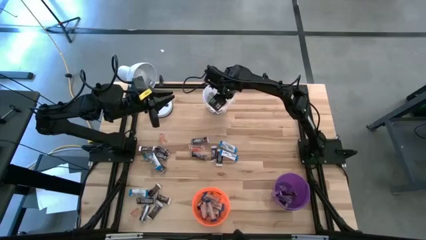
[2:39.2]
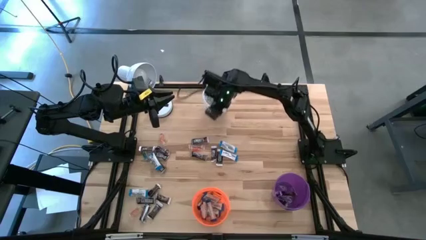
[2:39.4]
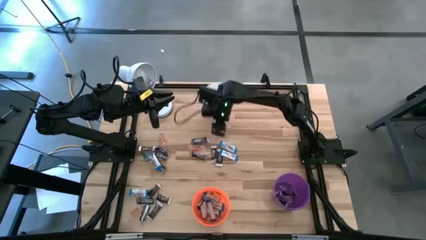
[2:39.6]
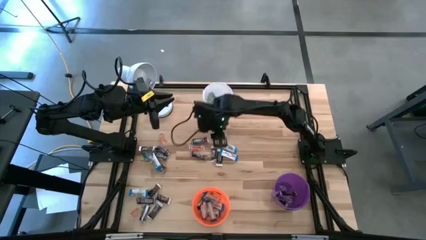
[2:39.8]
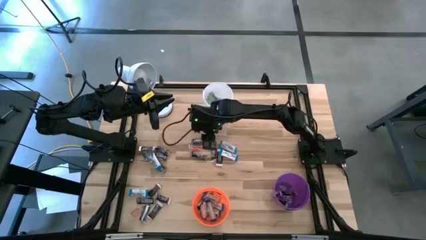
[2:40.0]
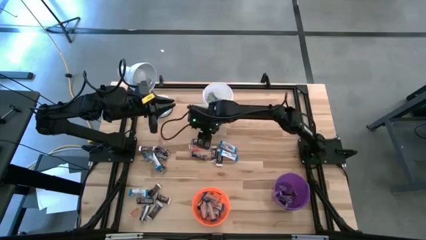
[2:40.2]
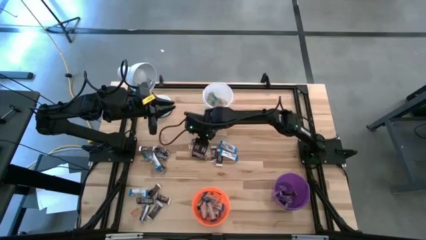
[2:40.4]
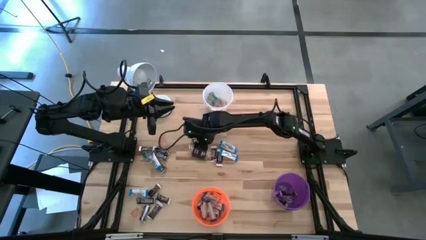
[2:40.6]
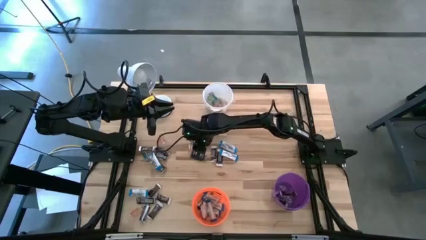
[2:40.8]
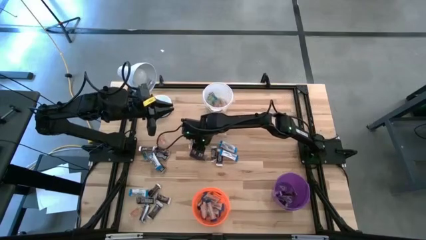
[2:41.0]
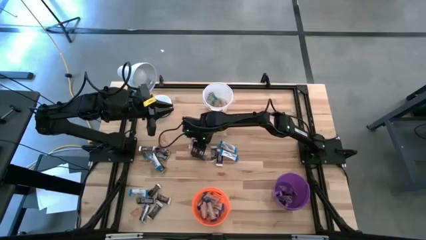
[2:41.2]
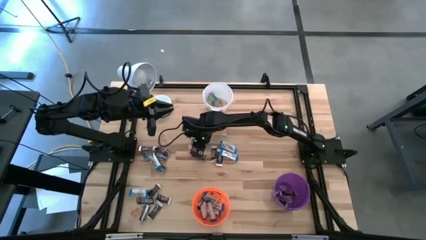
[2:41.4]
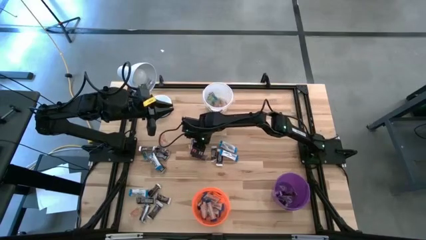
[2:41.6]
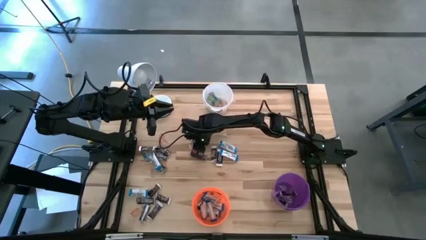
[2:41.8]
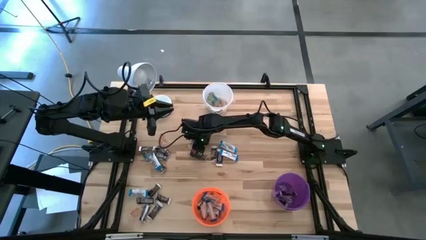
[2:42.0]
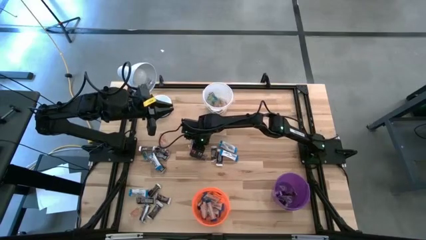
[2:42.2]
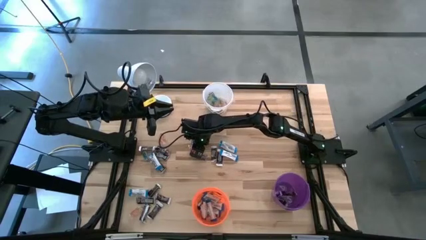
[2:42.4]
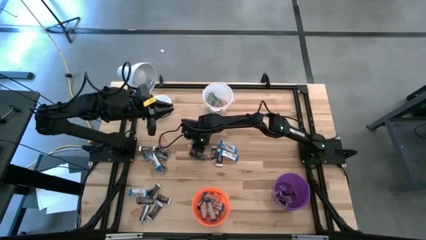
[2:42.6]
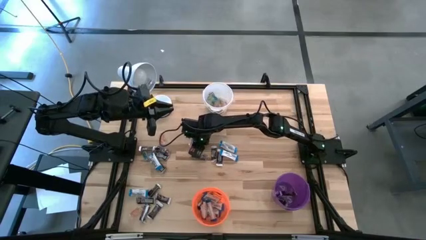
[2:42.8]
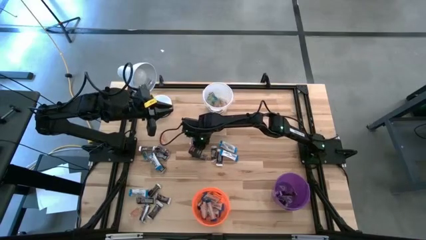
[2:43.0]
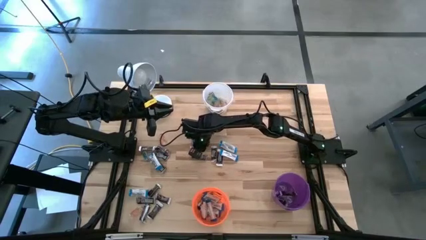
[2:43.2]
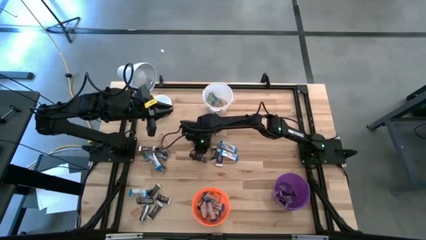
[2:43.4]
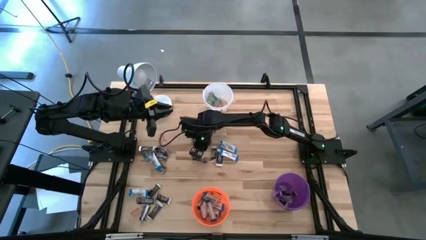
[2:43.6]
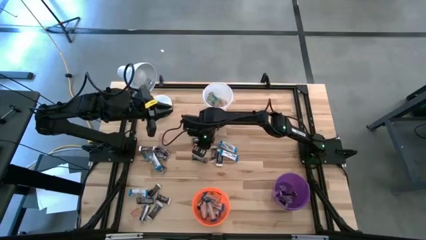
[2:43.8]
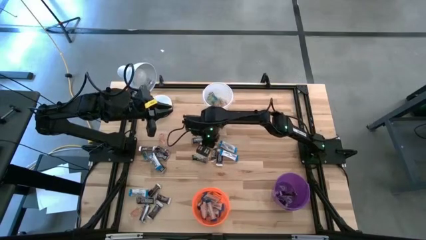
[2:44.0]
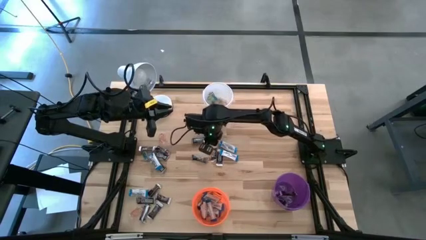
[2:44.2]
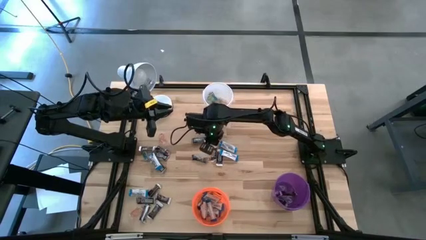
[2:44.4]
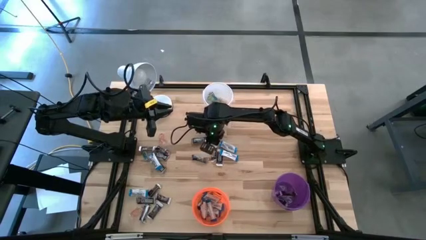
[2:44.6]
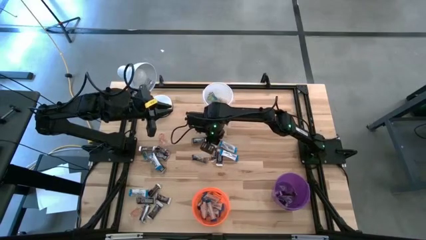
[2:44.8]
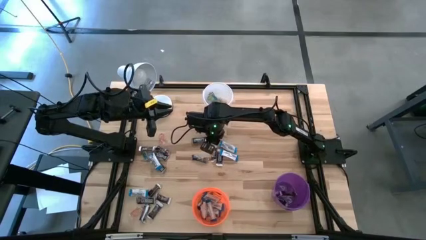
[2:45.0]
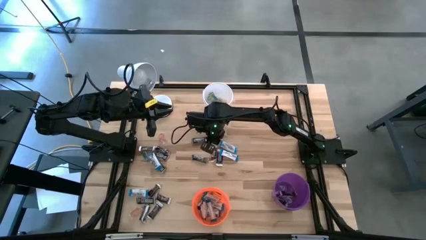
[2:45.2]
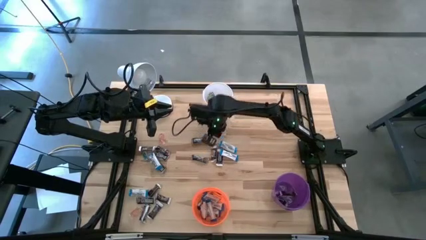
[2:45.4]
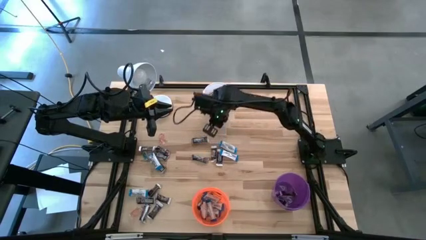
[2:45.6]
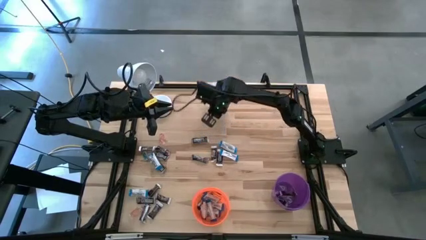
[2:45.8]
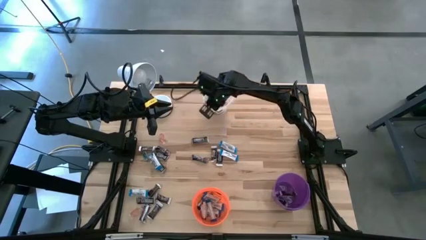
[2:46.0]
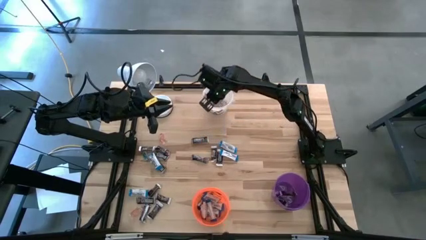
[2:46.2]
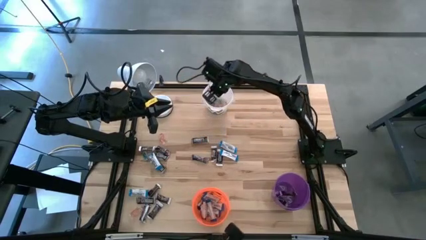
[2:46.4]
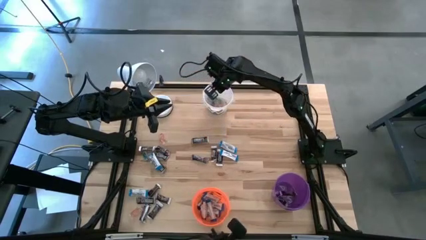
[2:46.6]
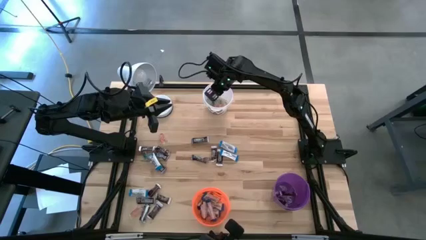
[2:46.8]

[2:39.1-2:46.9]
Task: Organize candy in baskets
Put the red gummy into the white bucket

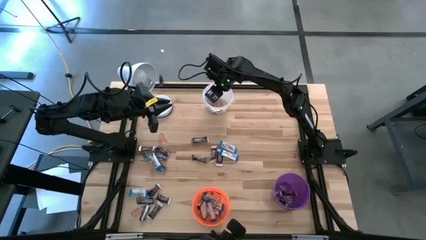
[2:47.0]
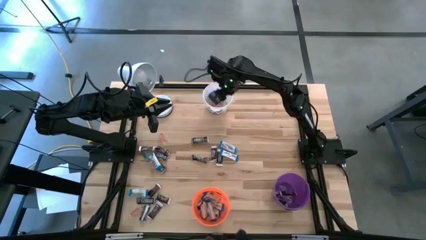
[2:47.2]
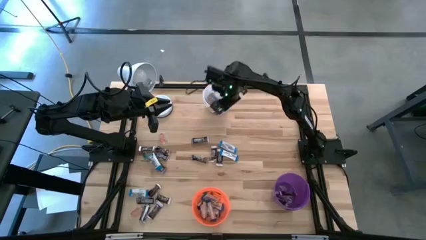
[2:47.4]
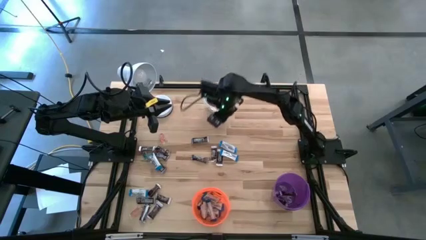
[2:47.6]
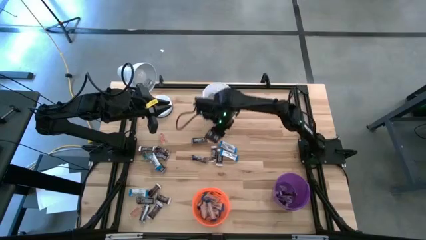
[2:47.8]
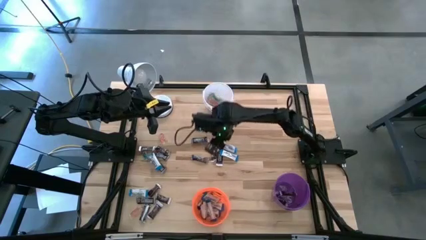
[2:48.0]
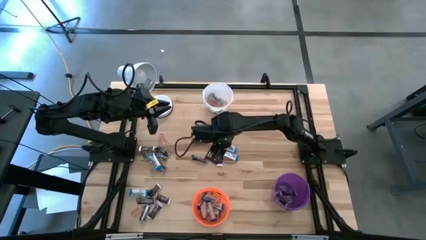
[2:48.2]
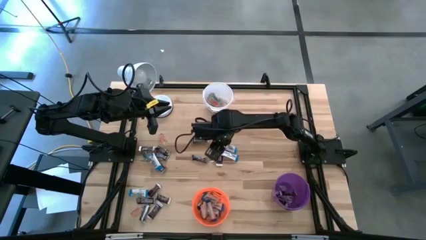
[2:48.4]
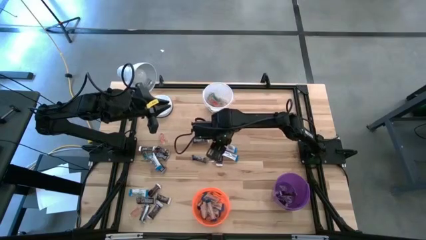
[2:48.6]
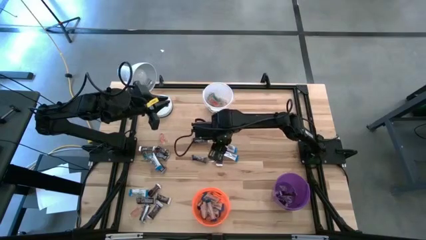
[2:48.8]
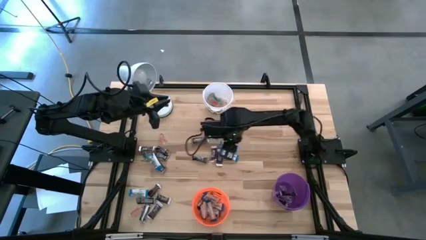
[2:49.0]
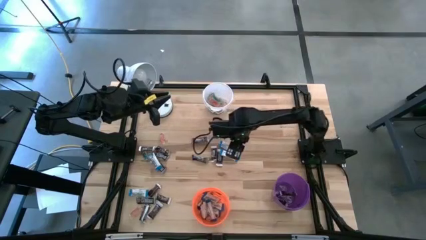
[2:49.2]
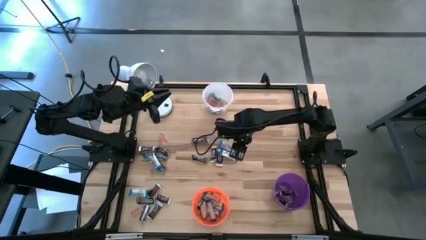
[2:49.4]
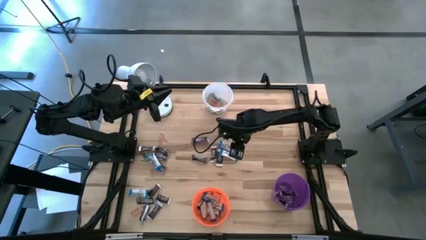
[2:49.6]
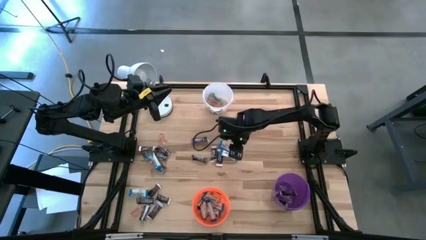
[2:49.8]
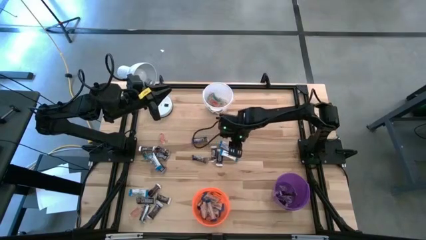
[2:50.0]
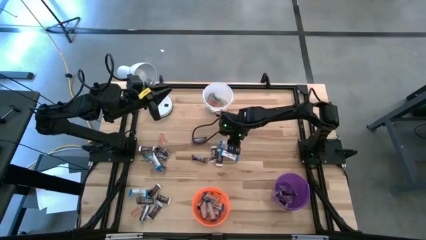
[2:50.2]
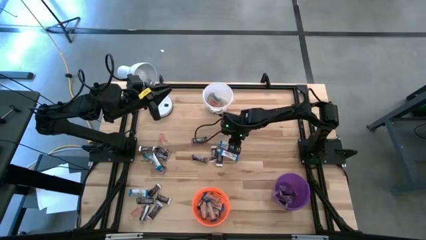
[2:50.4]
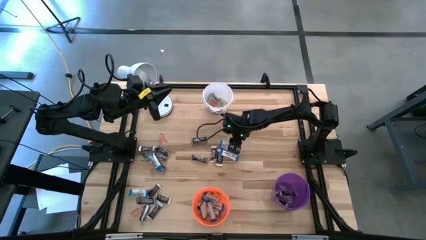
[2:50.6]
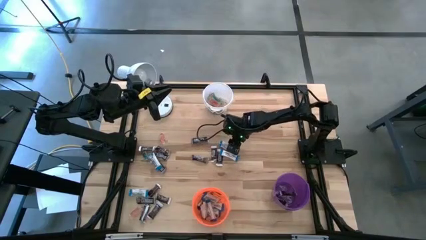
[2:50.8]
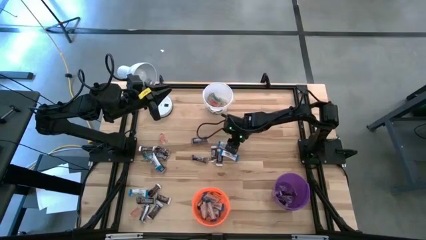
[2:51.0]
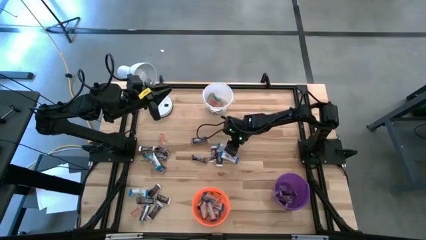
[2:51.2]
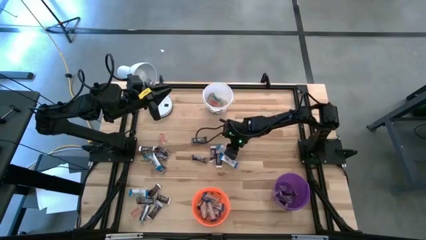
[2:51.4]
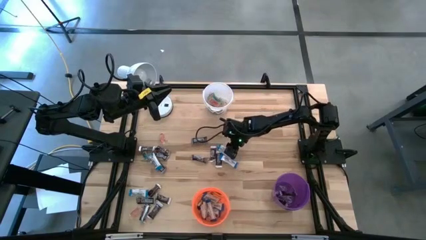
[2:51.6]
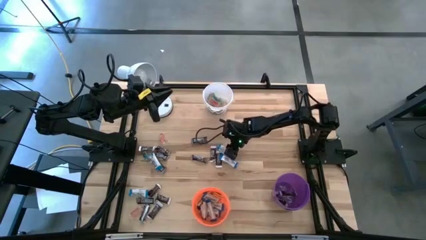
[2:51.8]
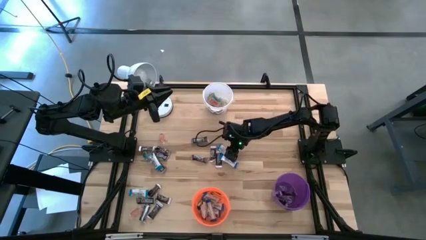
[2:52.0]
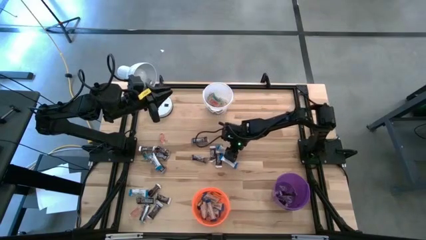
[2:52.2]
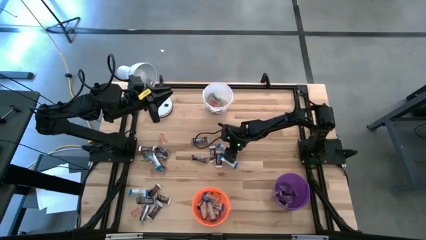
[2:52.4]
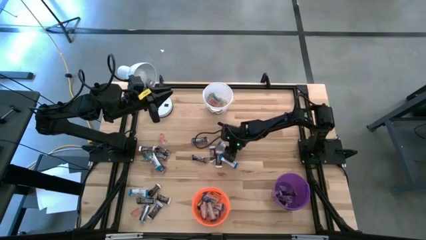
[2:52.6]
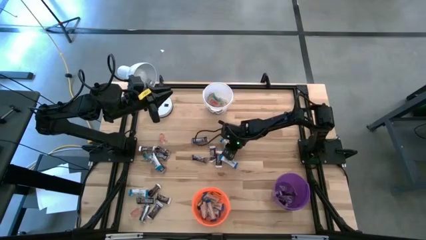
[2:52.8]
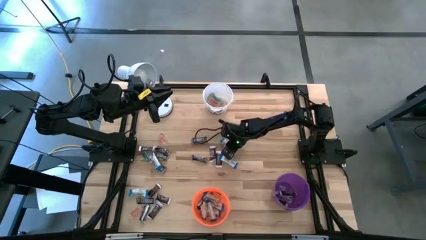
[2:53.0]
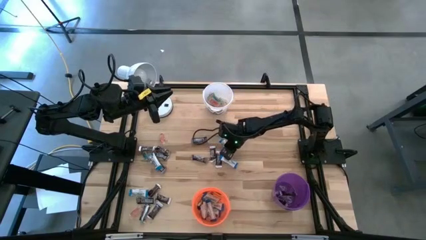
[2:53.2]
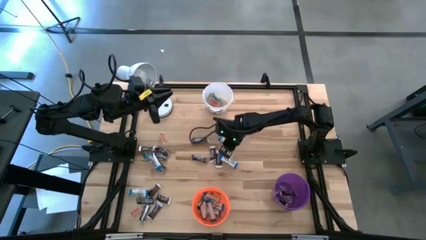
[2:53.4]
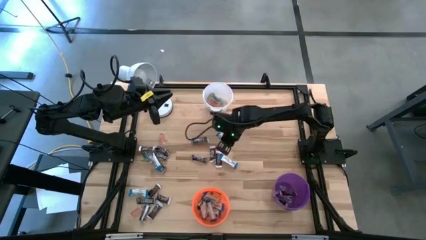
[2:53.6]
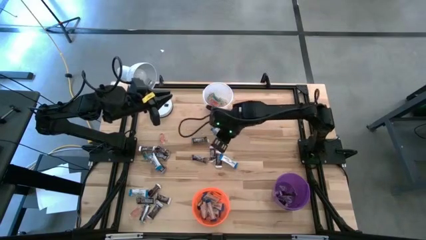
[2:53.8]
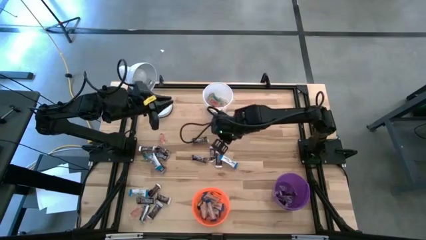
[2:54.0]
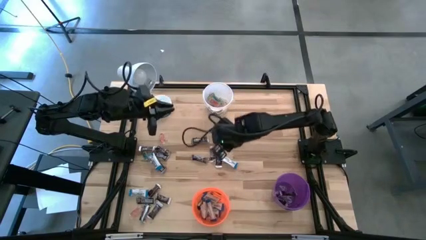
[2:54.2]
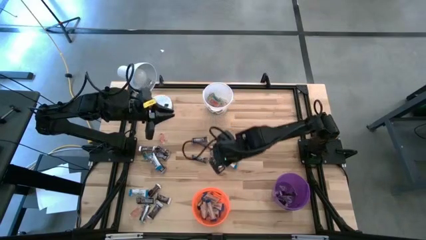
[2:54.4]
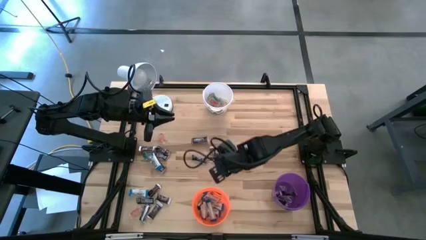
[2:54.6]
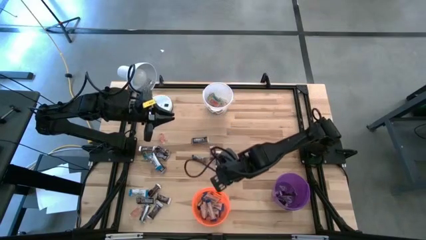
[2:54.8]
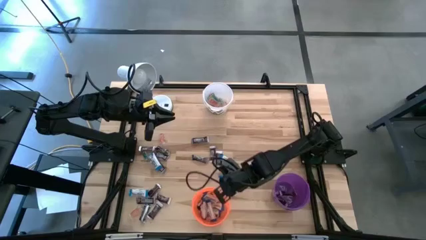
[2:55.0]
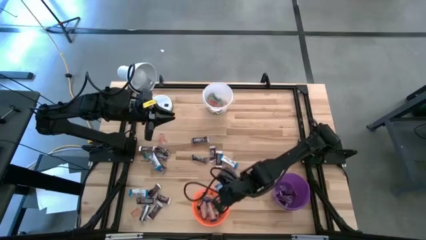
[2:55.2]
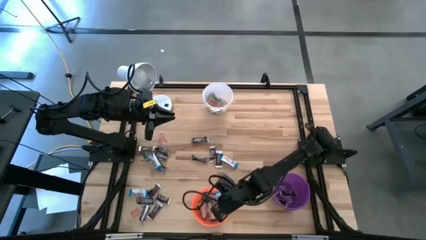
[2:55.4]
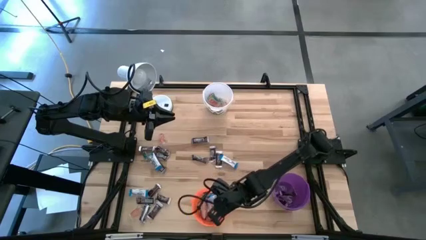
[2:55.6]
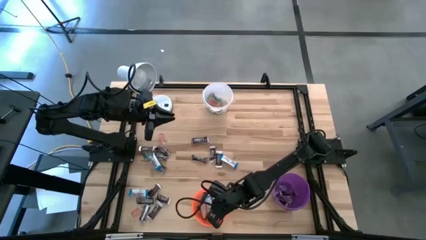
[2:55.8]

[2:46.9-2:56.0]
Put the white chocolate bar into the orange bucket
